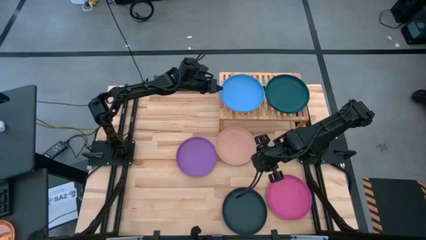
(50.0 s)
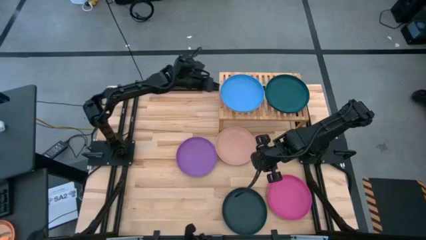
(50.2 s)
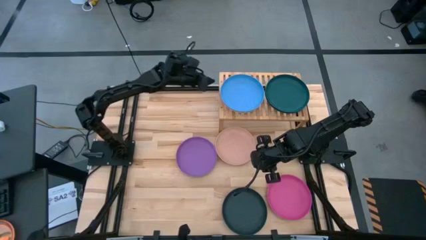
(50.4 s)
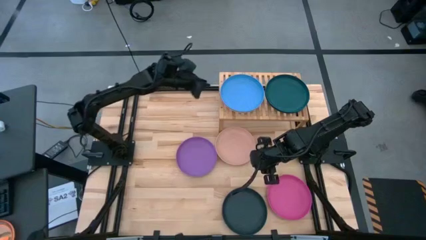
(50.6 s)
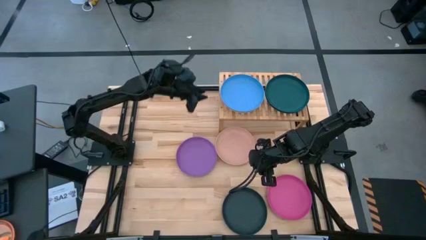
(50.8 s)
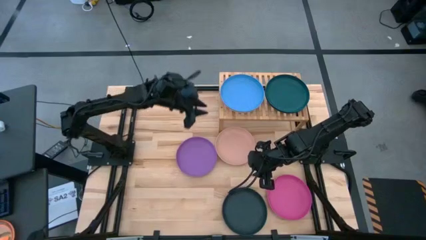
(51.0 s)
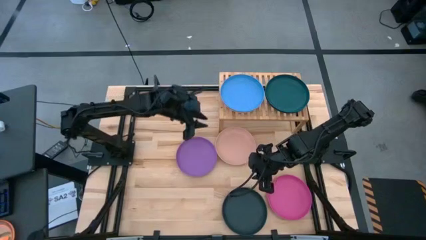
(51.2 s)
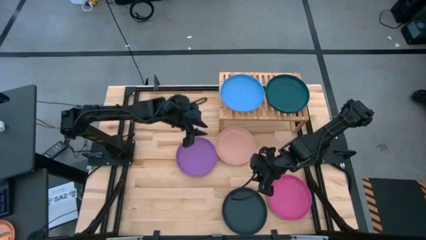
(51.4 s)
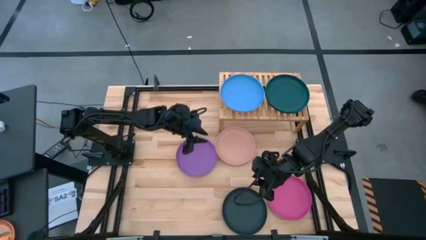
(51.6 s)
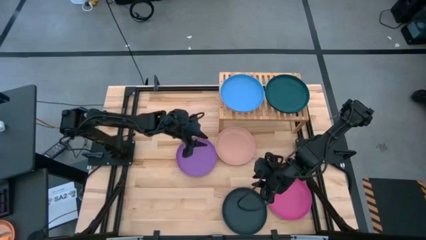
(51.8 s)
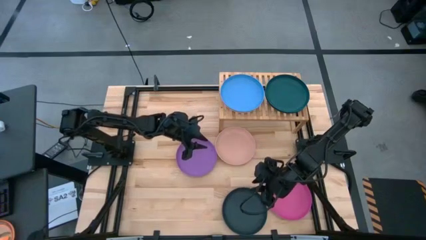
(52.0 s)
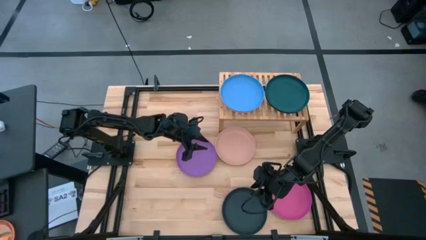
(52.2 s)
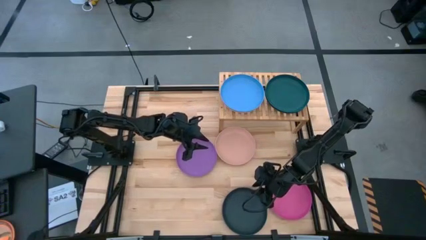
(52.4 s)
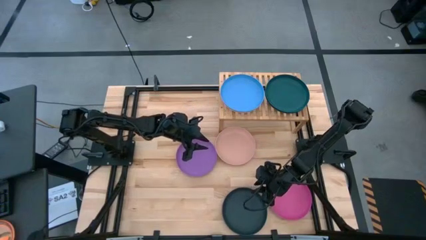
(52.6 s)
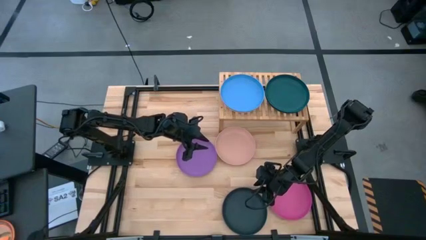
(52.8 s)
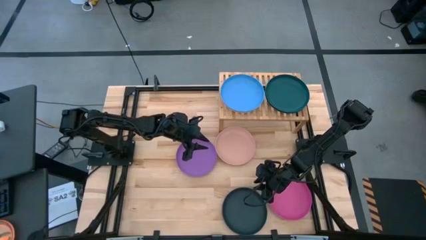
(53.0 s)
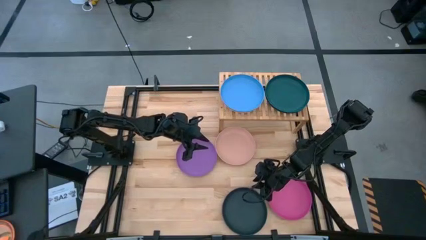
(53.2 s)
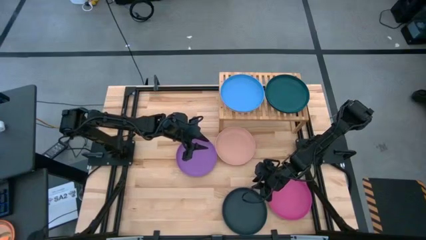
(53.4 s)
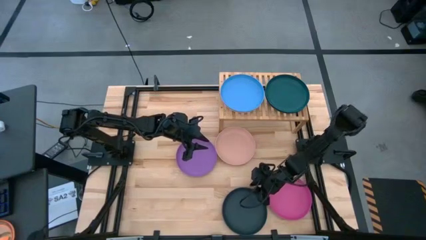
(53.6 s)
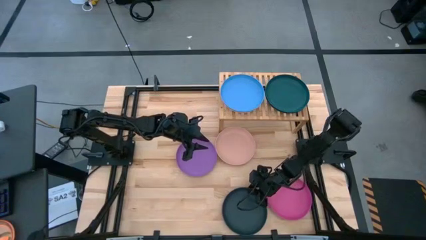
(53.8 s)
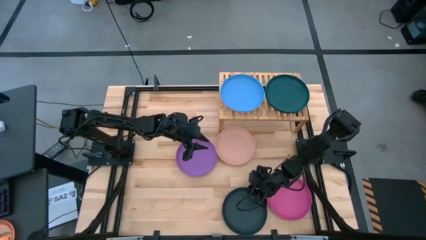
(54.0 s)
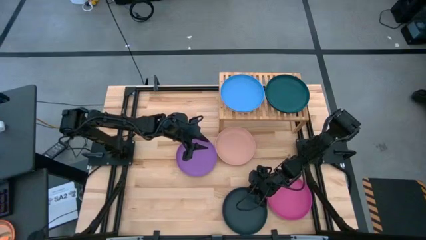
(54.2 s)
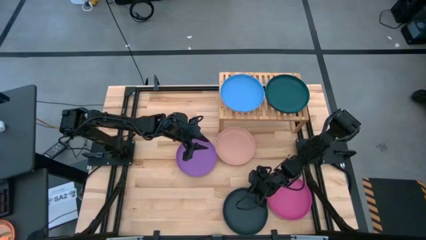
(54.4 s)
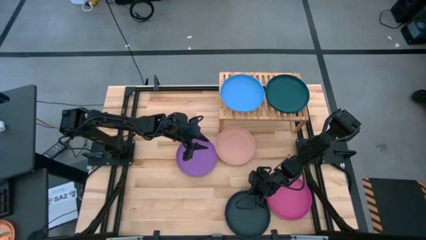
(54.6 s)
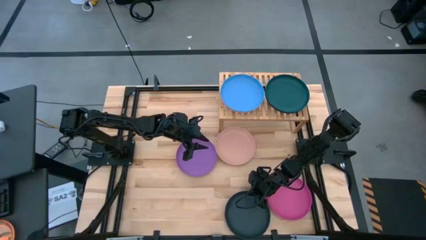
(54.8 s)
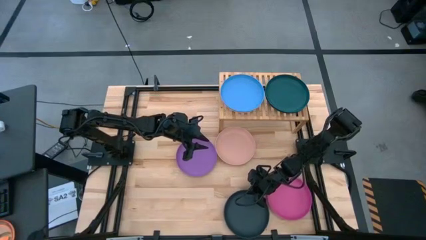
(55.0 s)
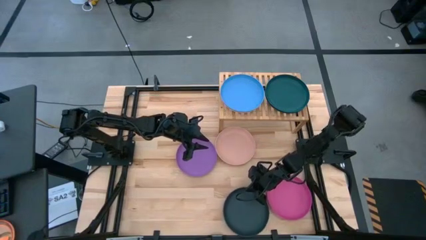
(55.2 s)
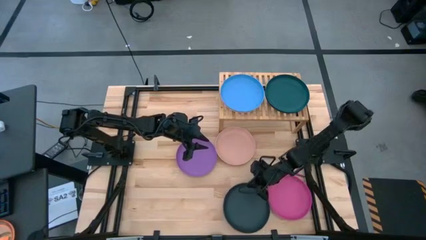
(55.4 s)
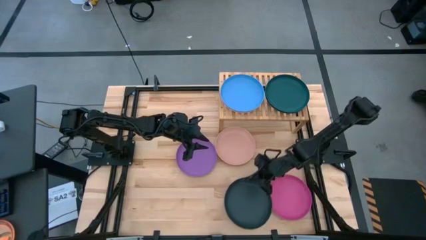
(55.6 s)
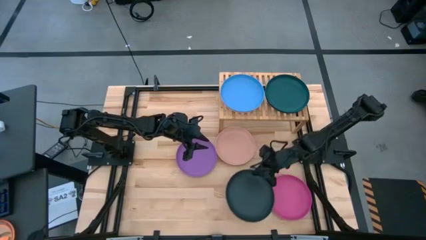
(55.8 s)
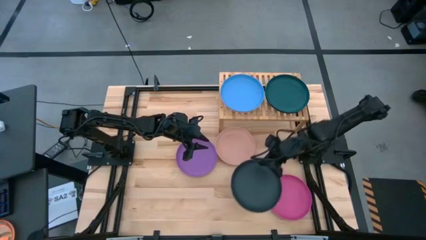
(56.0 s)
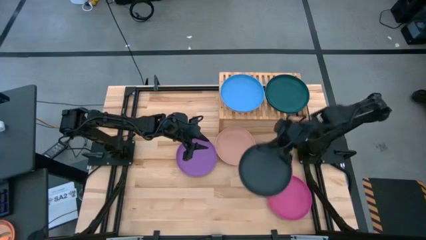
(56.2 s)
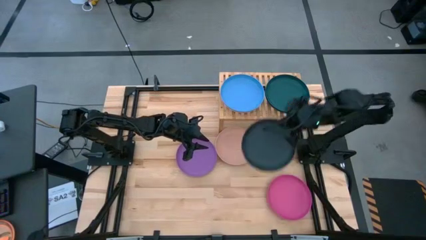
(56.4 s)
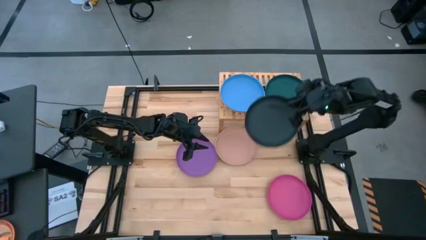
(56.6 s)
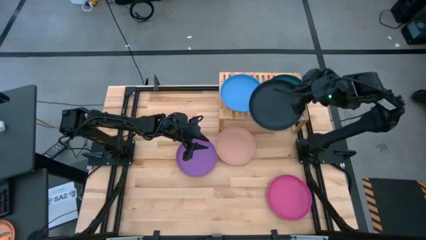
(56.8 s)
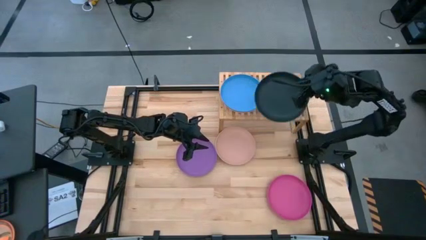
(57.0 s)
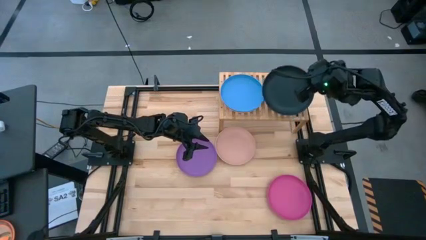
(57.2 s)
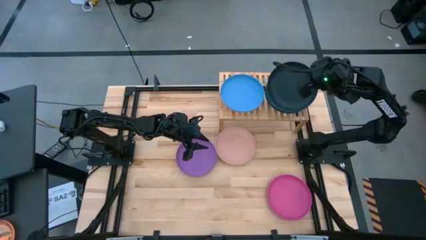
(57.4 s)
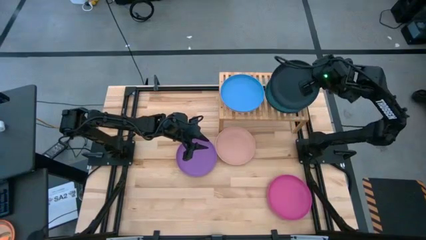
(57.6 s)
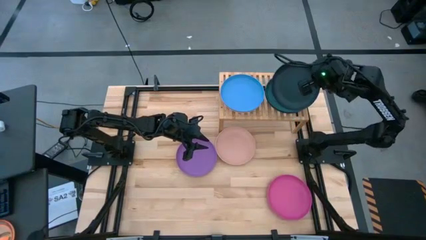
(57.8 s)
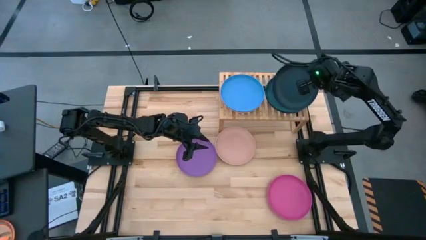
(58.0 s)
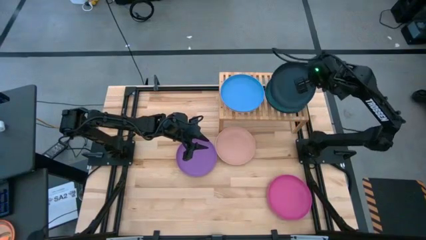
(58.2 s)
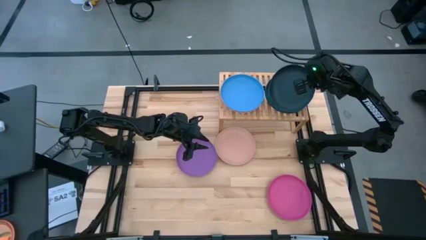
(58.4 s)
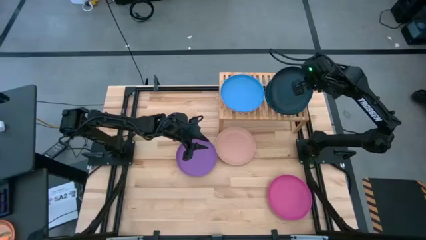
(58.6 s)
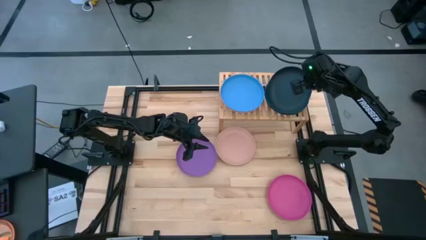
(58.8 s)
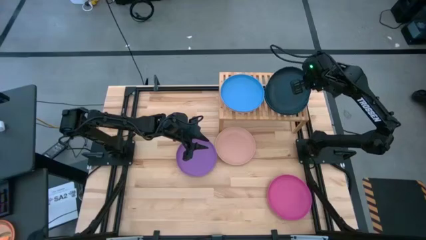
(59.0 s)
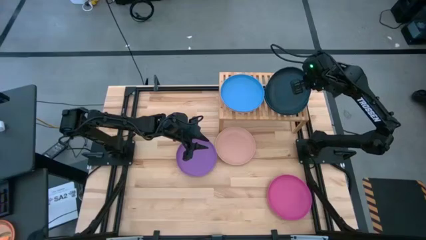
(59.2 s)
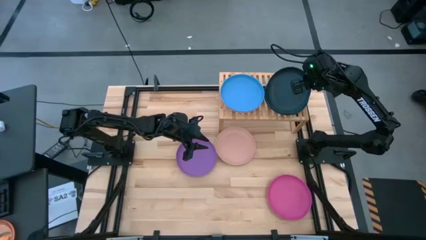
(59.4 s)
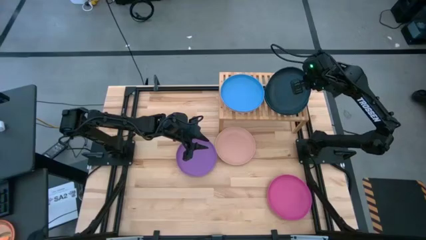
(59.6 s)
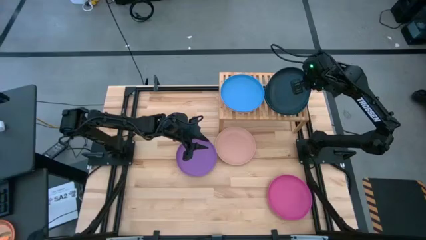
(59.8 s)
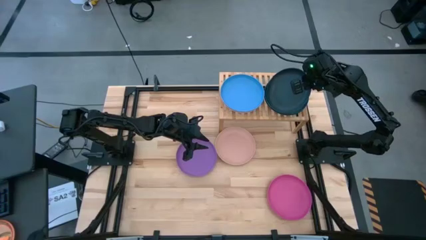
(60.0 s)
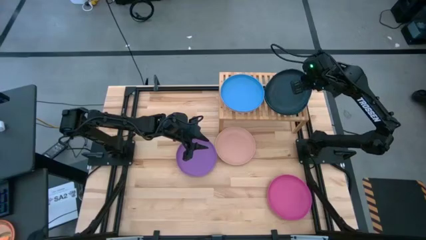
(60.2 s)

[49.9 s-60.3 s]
Task: Place and stack plates onto a shelf
Stack the black plate on top of the other dark blue plate on the shelf
